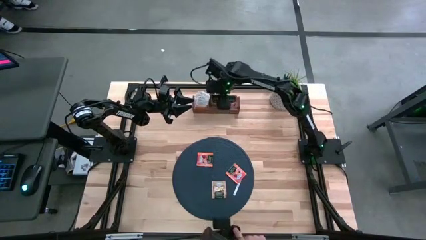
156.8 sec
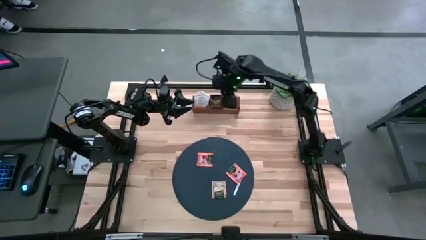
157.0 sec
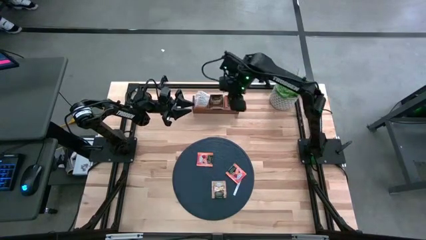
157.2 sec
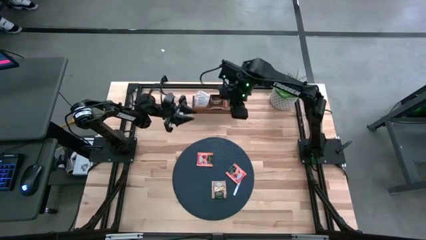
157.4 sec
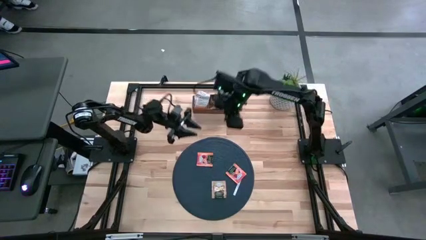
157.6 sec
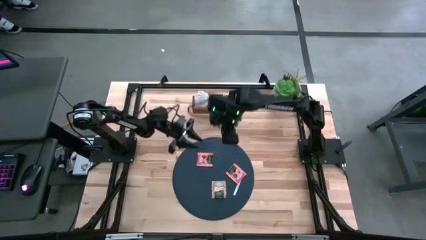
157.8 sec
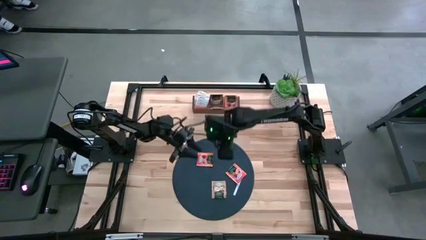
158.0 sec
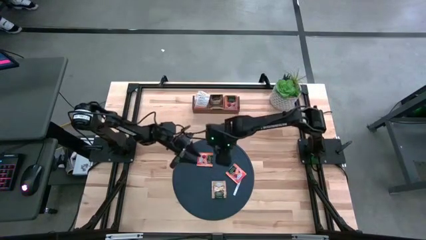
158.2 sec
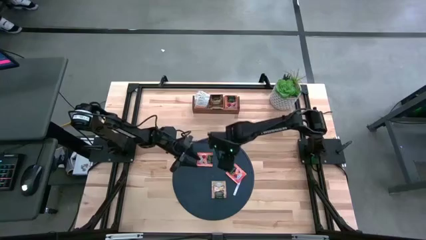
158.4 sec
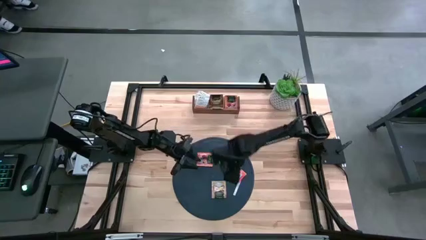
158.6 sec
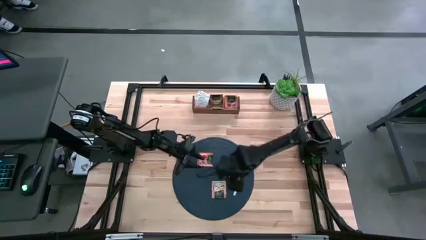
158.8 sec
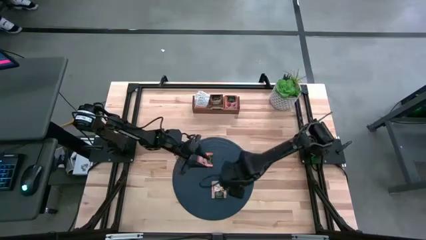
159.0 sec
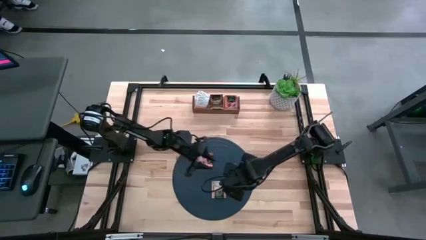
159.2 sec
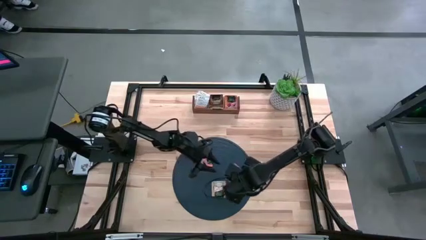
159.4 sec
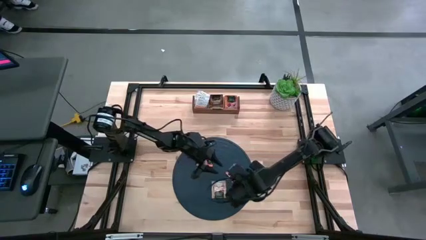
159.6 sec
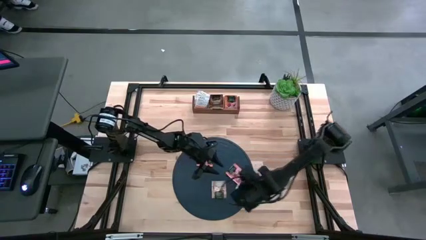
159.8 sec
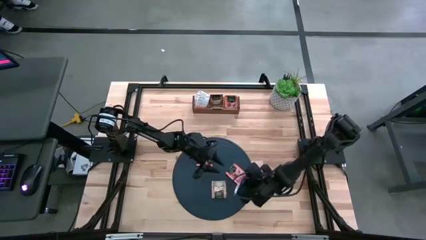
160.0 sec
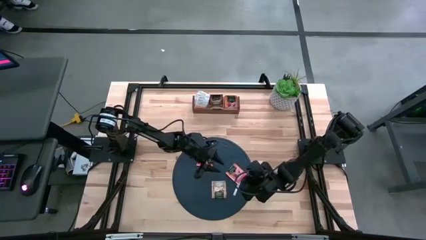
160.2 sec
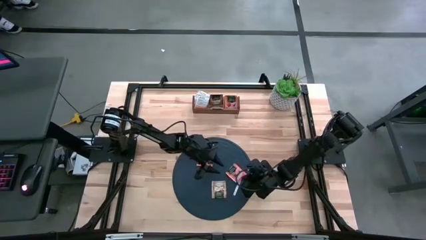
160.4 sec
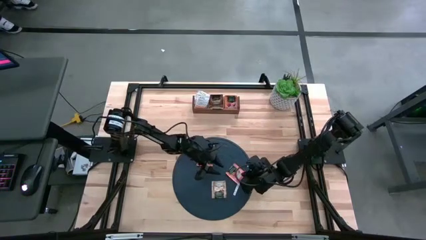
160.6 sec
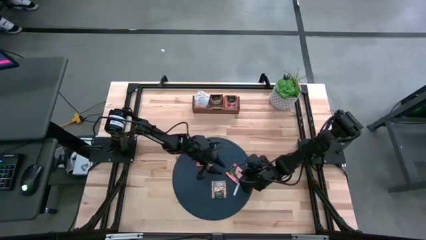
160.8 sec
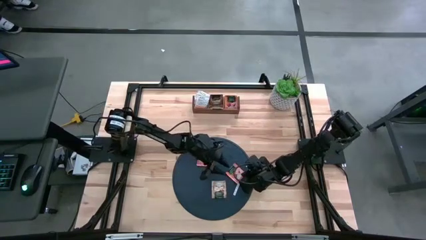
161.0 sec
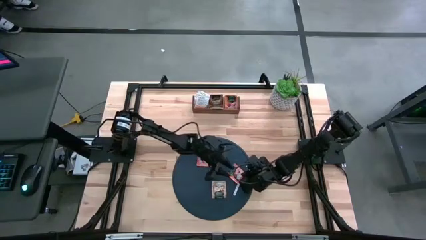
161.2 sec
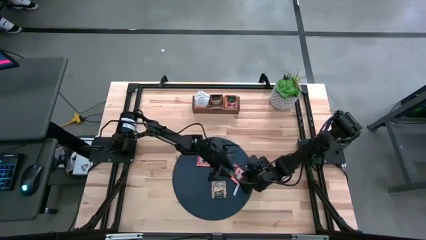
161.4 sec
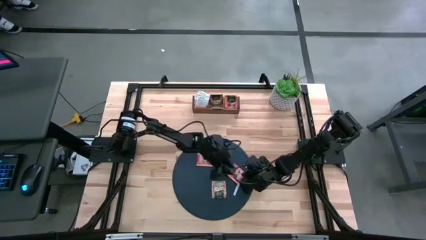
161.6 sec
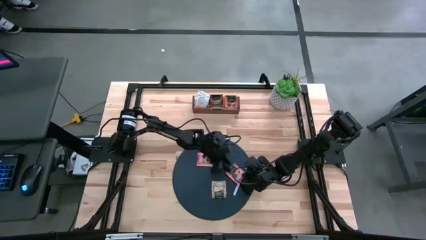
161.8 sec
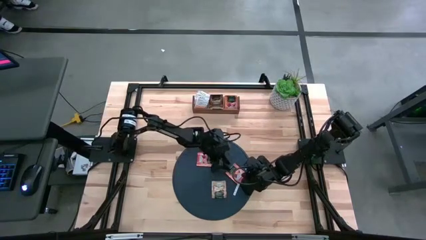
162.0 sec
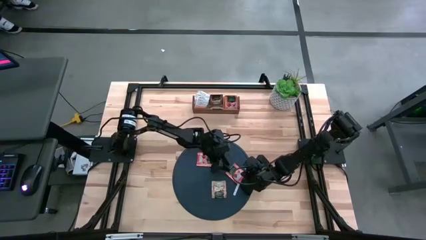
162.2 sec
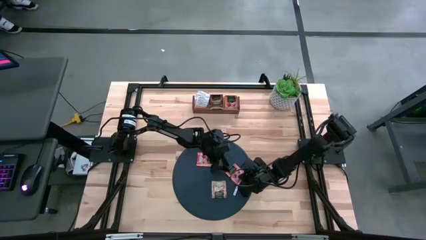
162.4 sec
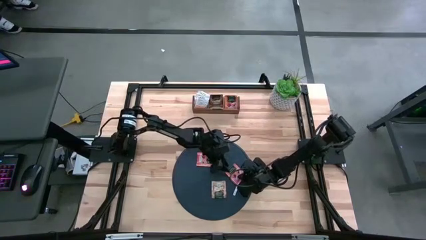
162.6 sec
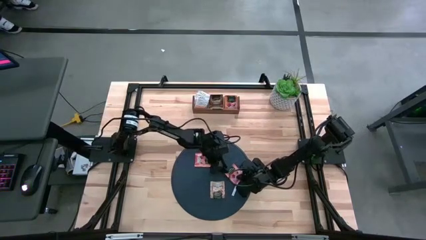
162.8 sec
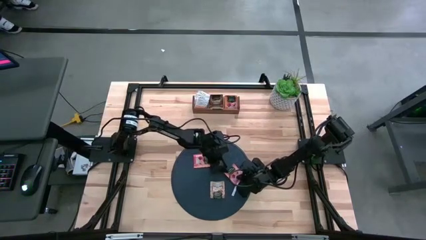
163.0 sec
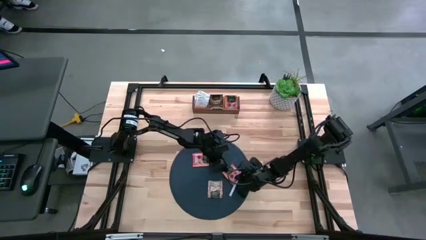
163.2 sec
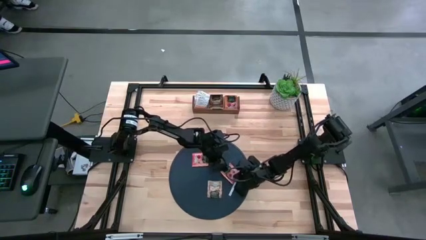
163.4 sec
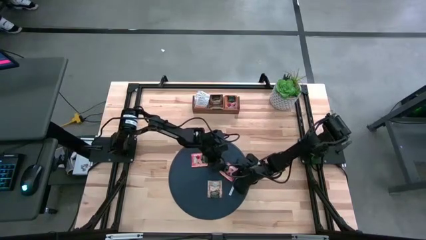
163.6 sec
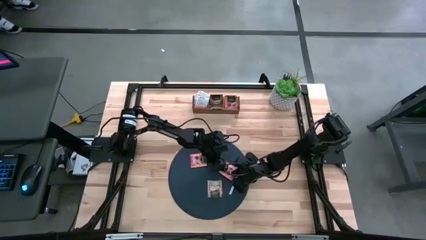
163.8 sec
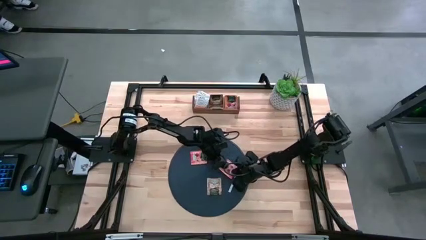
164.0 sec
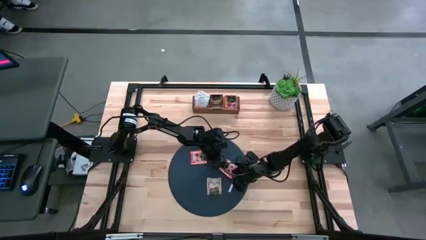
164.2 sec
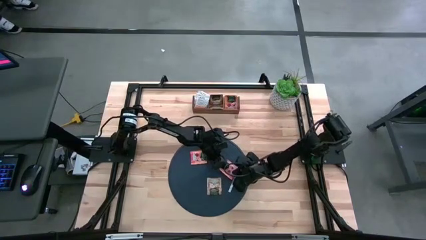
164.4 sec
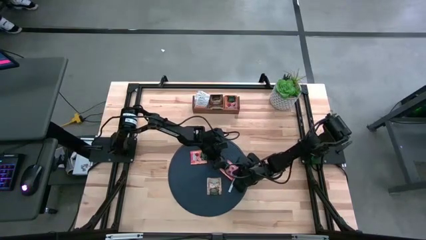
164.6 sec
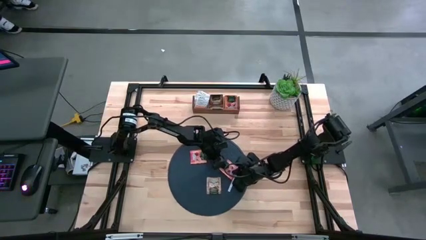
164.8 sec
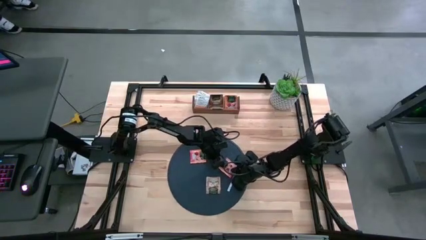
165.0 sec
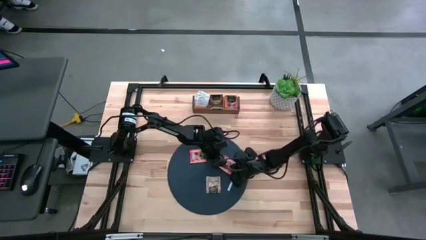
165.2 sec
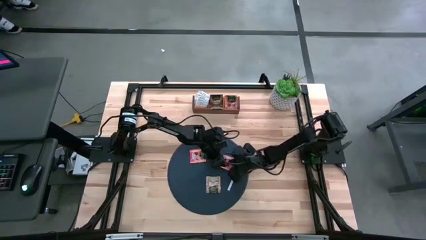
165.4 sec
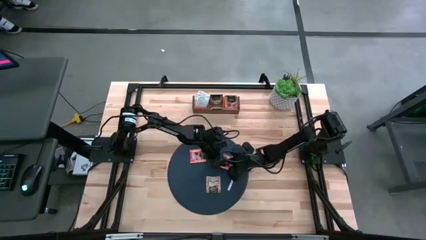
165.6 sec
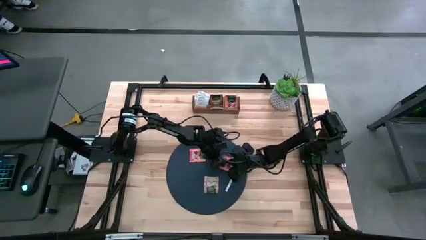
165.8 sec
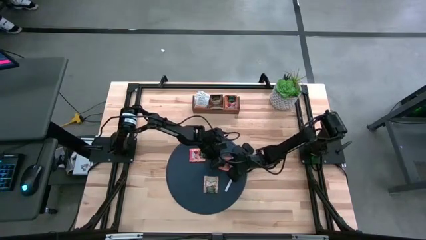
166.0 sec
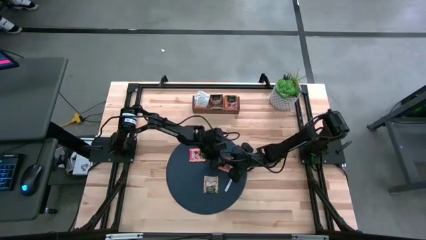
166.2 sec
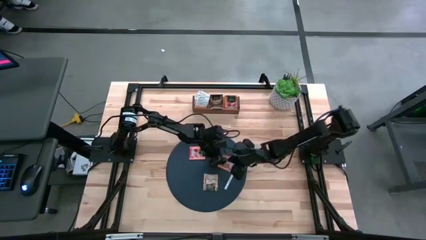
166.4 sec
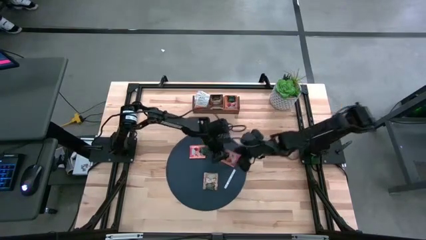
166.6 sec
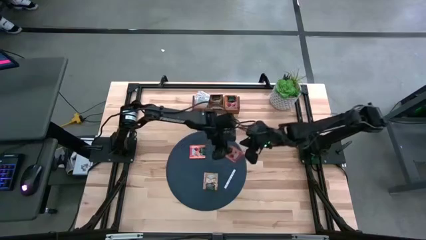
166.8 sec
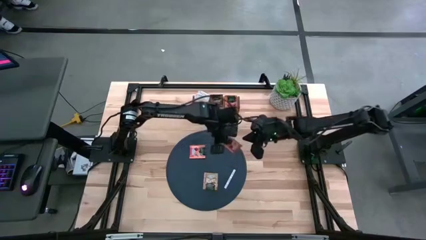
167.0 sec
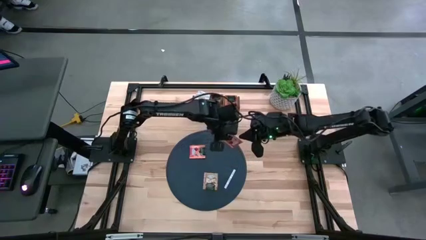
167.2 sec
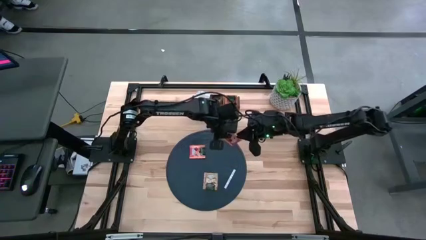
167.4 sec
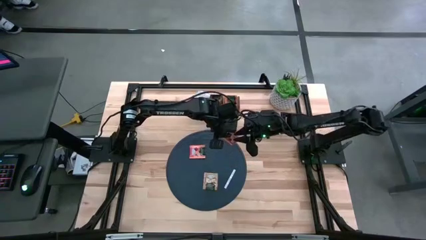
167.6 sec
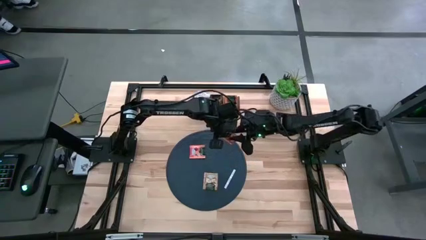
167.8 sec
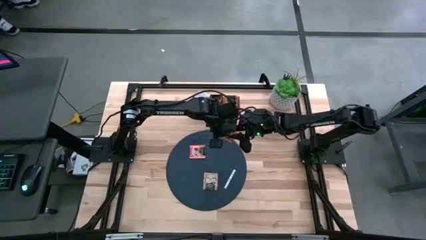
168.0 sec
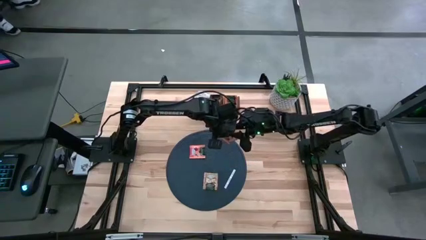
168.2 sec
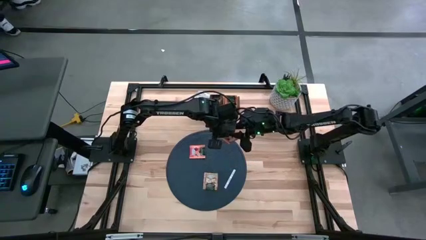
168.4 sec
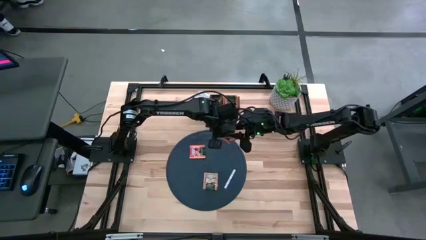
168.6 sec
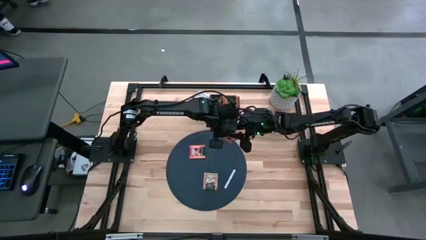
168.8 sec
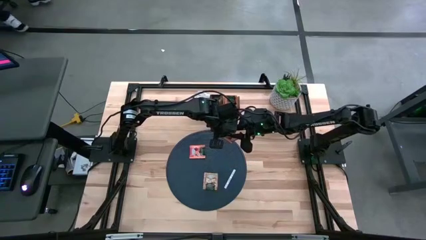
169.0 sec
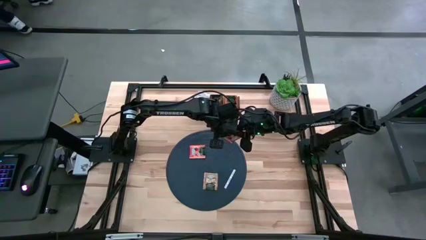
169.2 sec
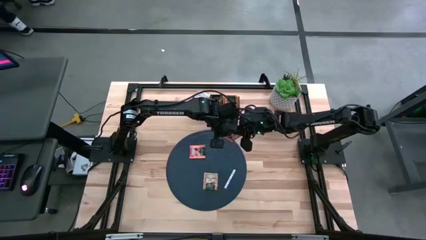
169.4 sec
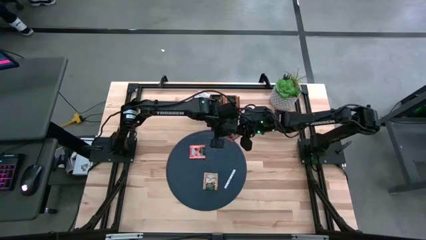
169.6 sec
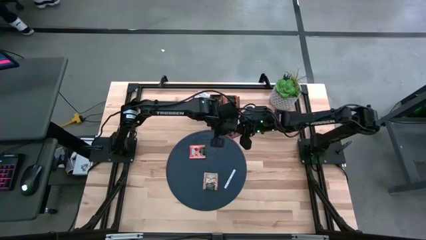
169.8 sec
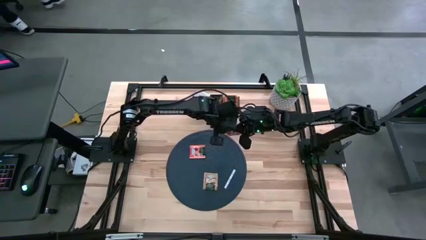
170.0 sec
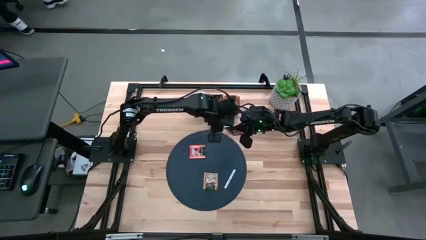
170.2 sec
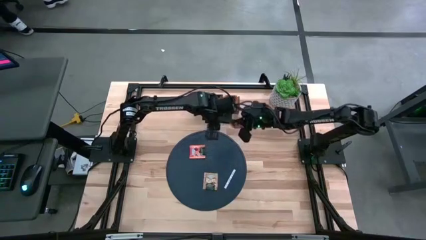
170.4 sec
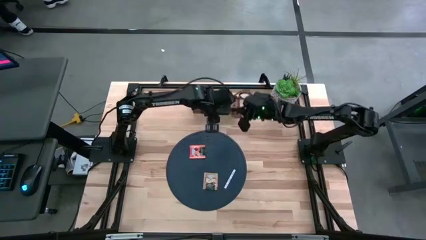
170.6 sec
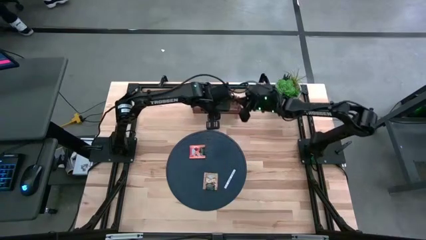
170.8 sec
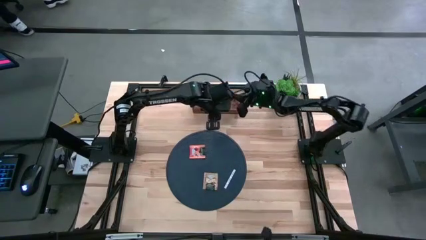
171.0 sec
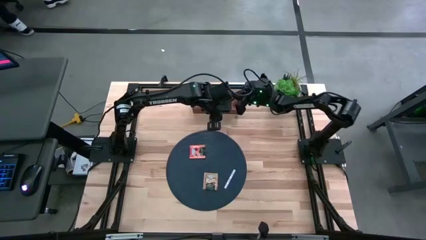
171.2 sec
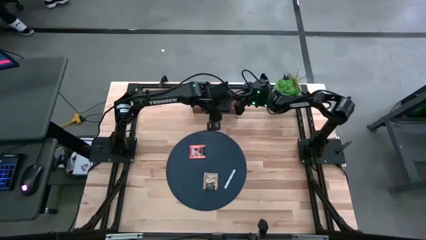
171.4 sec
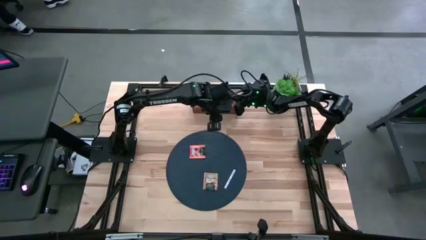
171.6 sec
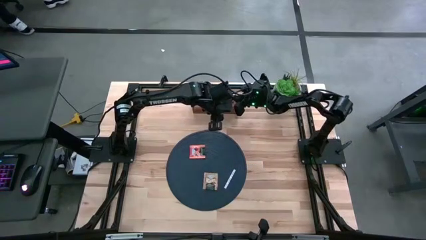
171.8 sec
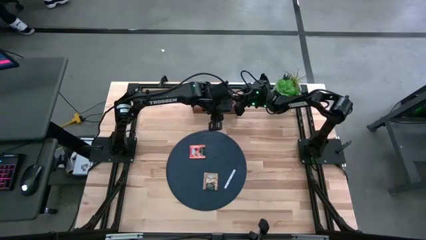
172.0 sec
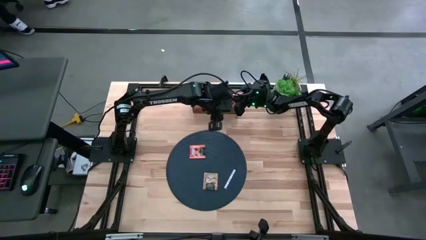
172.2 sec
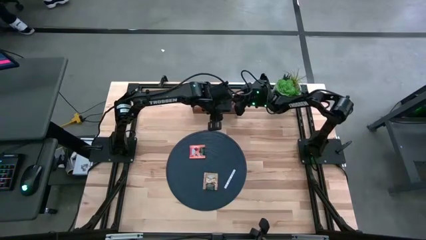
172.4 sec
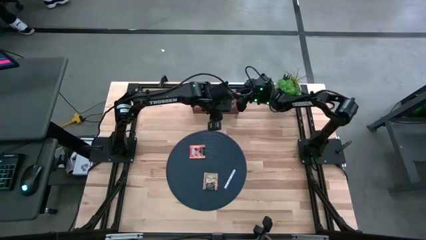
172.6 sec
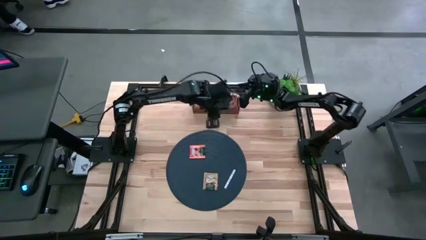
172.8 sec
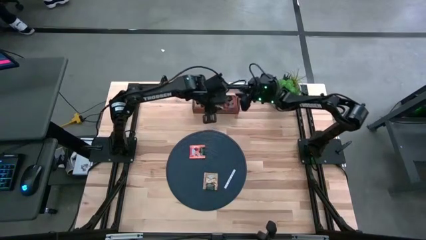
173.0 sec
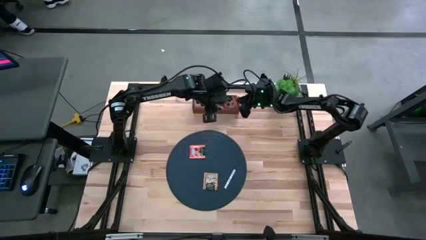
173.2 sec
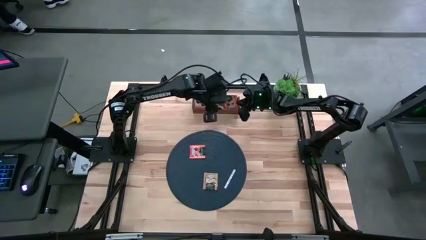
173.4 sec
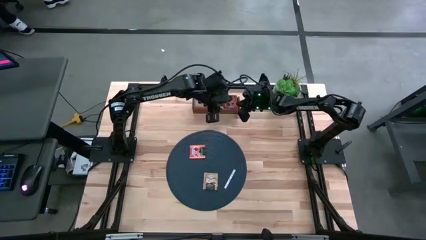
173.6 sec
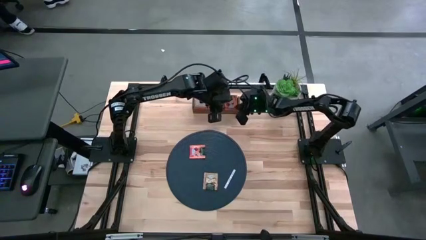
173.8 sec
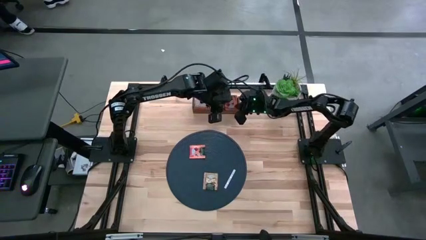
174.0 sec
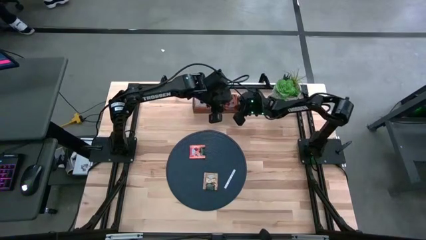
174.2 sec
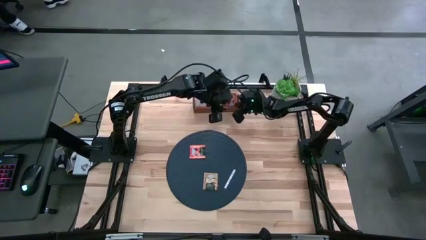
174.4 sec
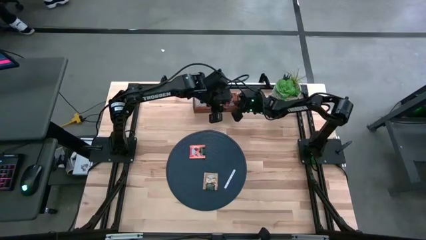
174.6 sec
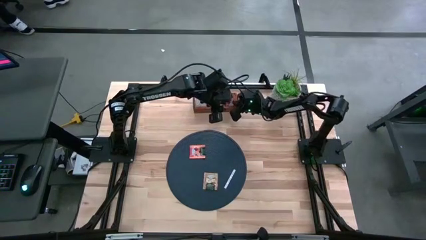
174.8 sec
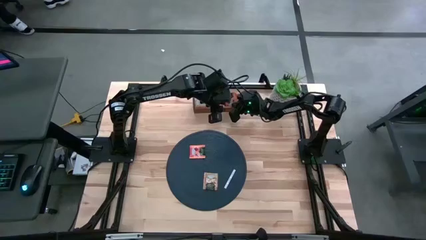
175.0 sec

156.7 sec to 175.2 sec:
Task: Pick & Place Tea
Put the orange tea bag into the right section of the wooden organizer
